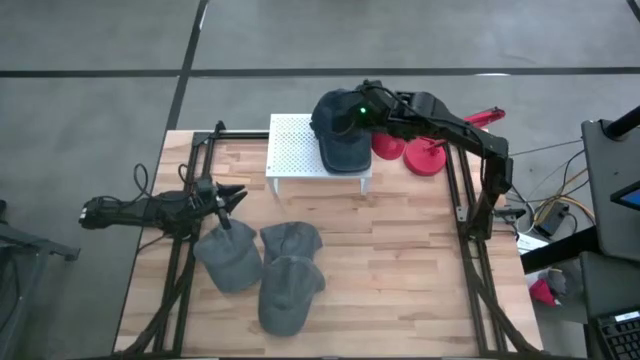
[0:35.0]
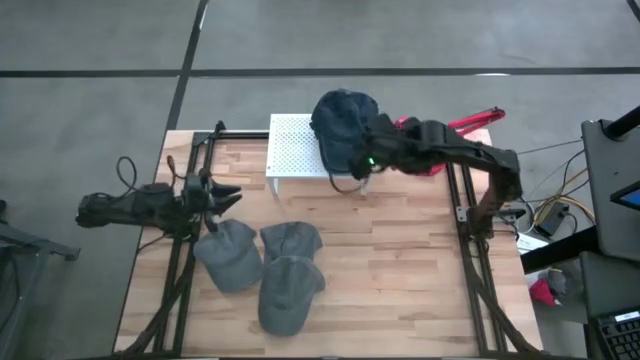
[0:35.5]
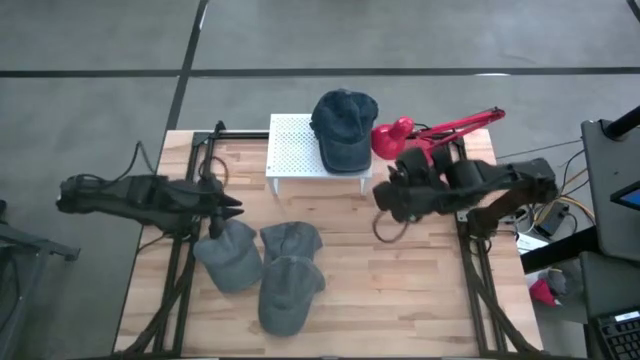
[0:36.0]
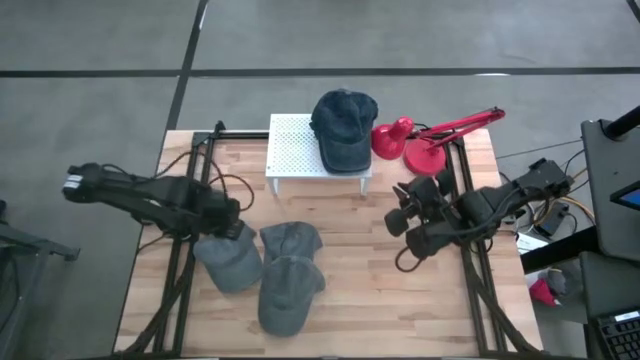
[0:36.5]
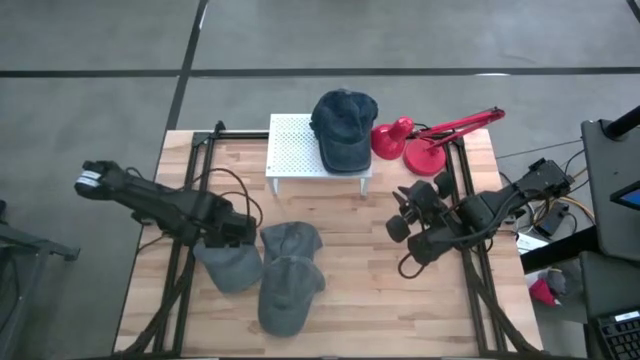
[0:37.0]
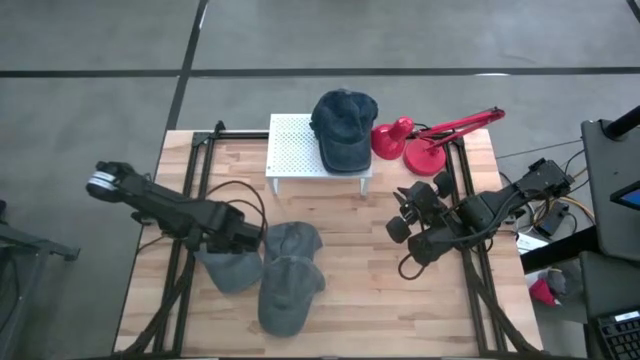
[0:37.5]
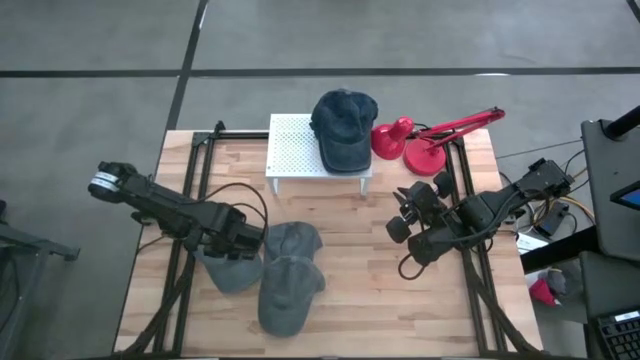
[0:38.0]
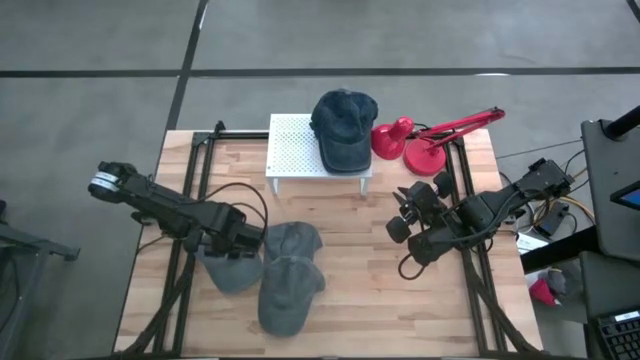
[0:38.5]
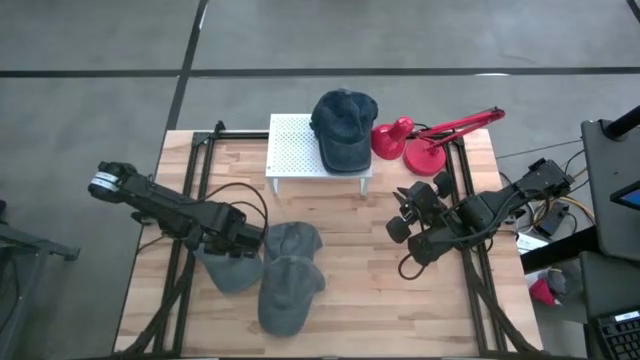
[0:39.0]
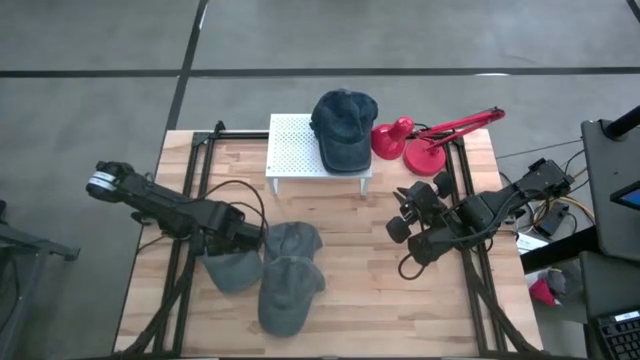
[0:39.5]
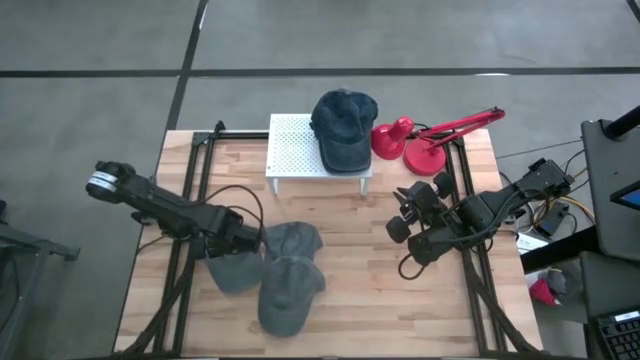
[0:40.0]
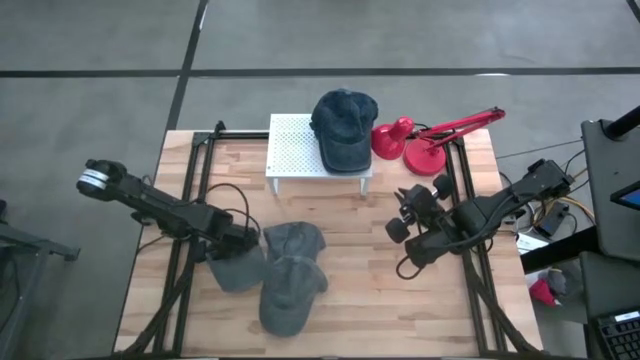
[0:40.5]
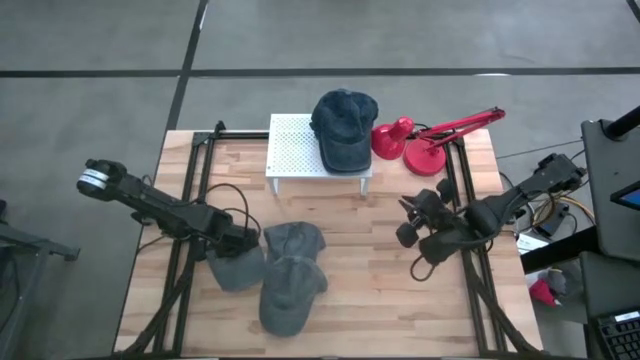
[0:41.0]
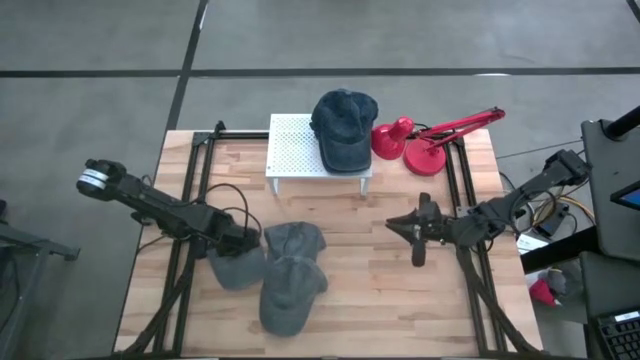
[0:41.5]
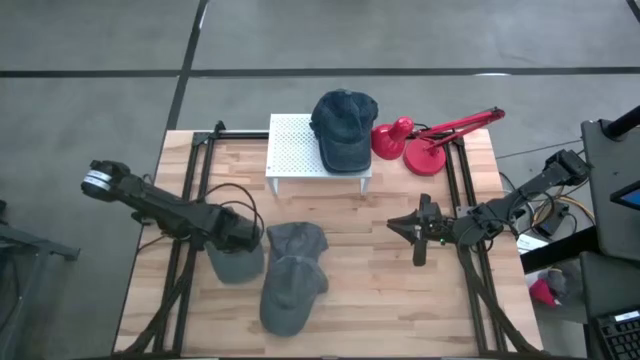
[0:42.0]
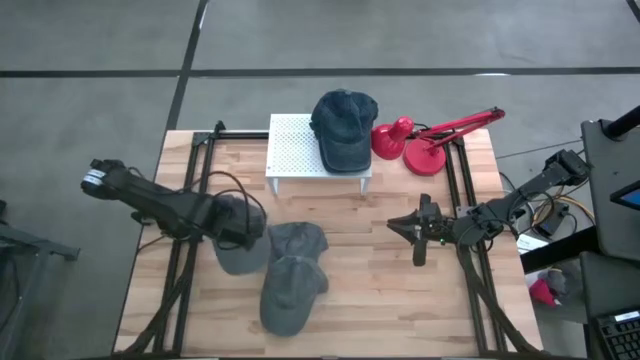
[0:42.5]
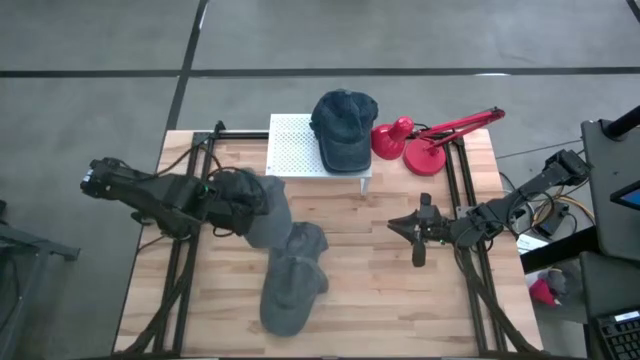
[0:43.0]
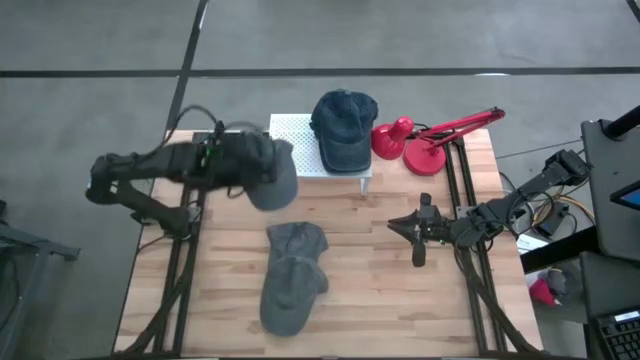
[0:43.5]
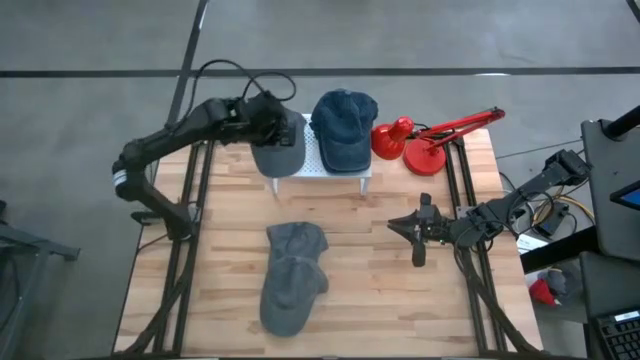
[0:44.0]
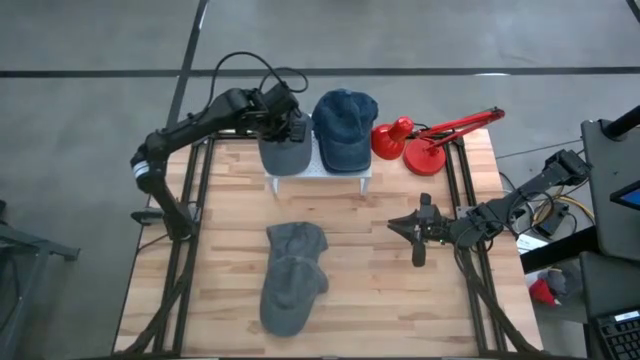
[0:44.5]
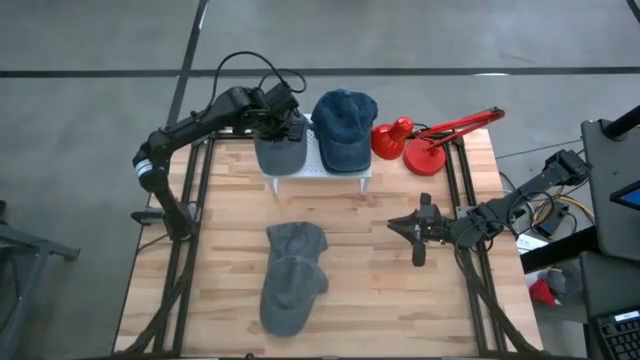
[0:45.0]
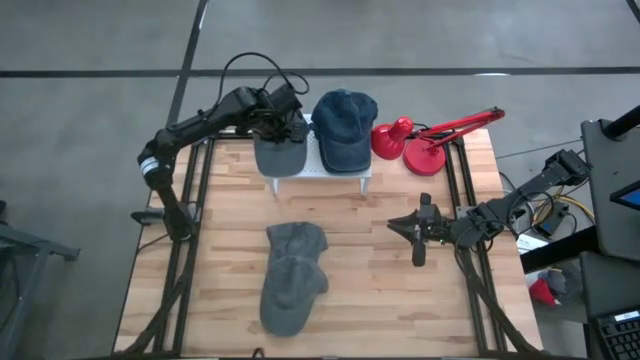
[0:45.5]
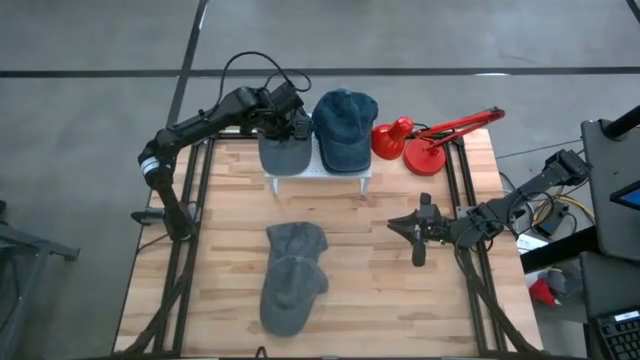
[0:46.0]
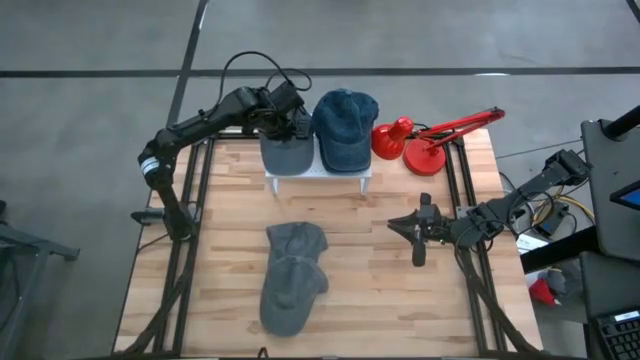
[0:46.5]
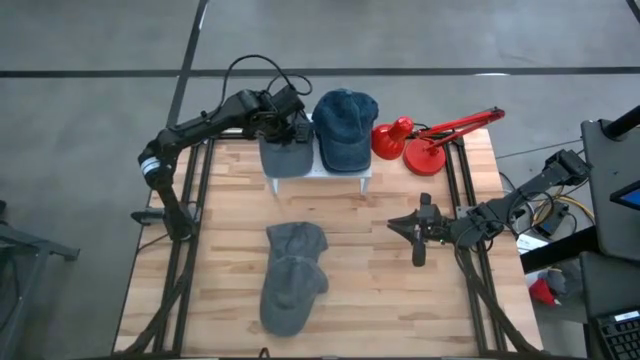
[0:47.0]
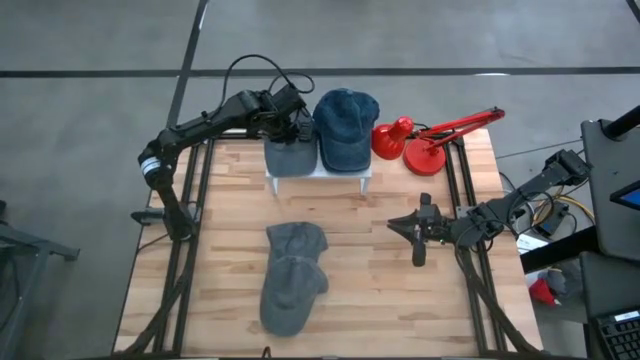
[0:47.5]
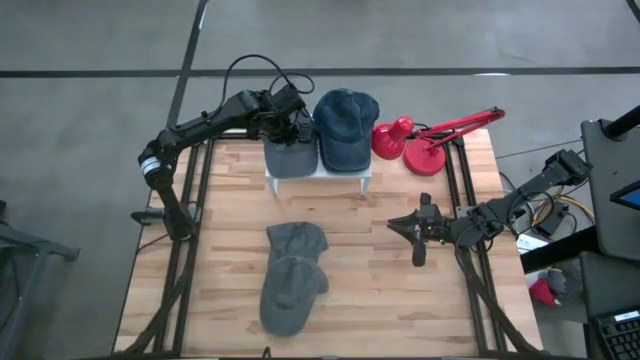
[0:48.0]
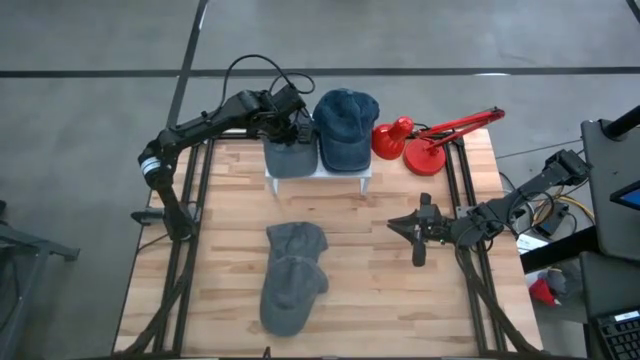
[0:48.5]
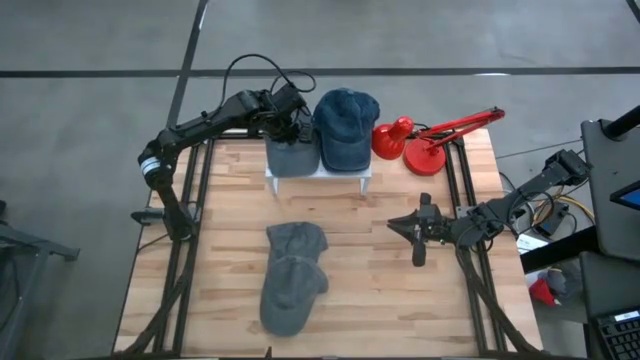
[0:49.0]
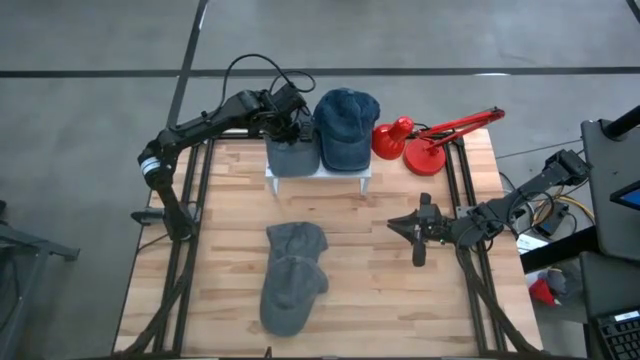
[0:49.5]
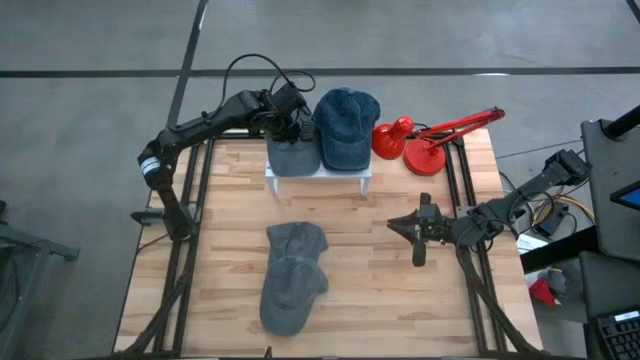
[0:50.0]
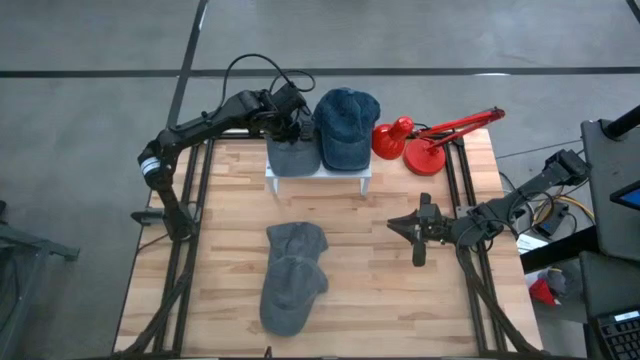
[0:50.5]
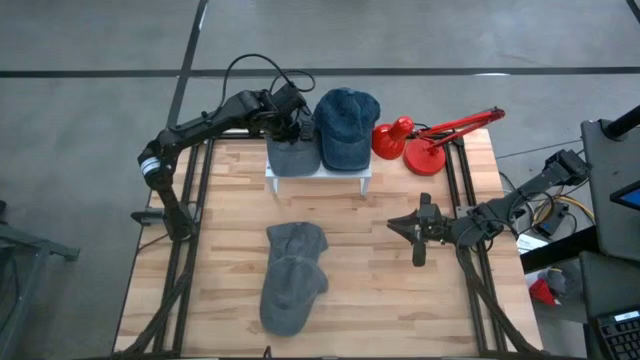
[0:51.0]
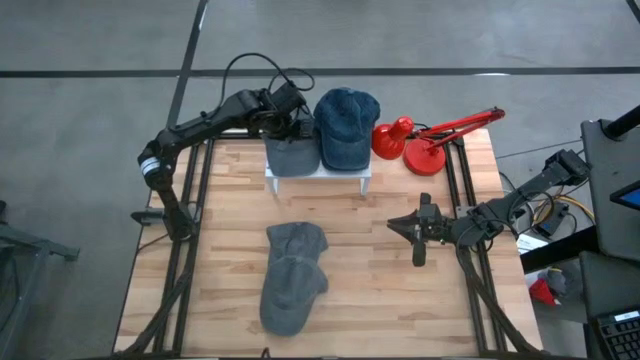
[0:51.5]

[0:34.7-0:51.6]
Task: Pick & Place hat
Put the top left gray cap on the shelf
